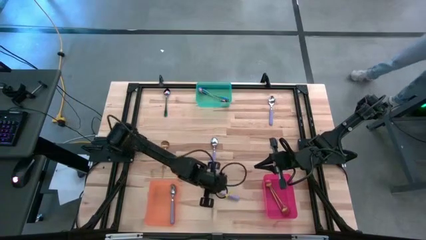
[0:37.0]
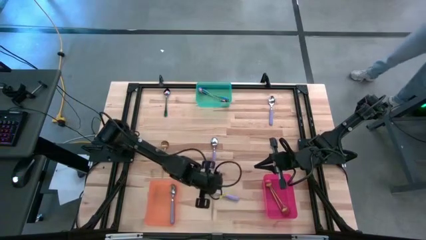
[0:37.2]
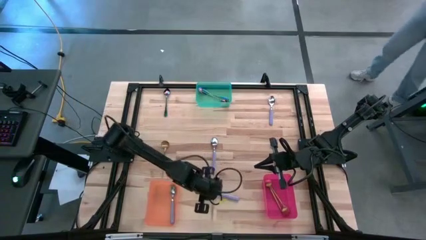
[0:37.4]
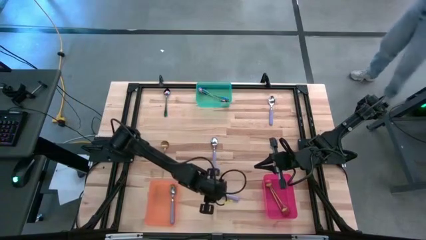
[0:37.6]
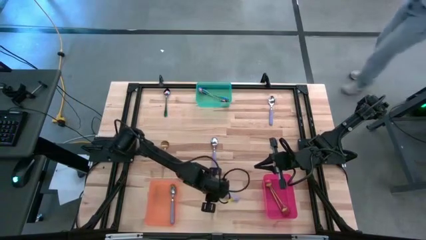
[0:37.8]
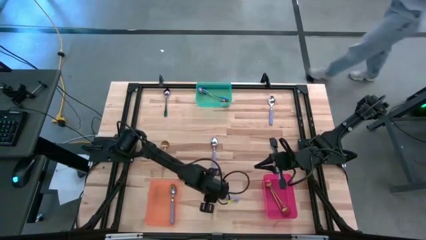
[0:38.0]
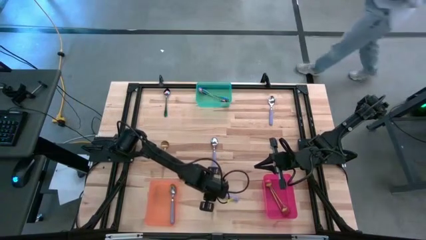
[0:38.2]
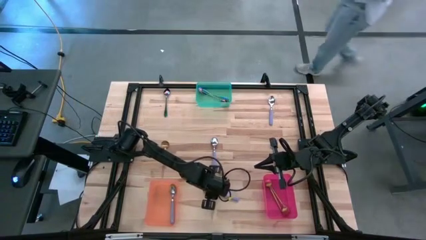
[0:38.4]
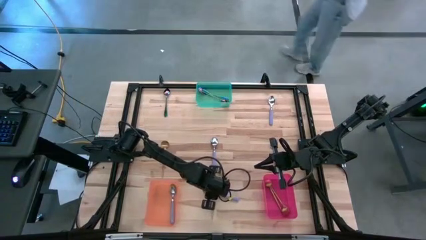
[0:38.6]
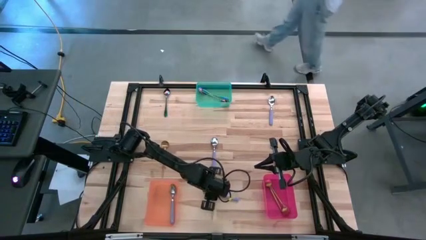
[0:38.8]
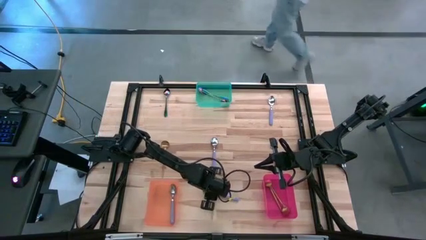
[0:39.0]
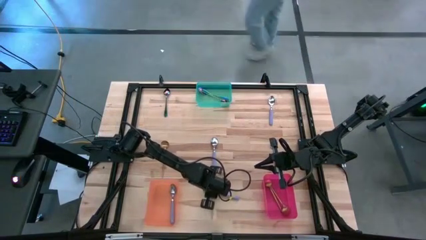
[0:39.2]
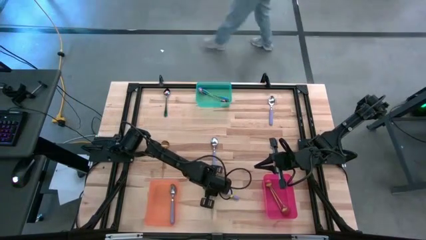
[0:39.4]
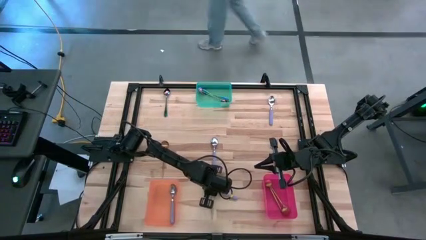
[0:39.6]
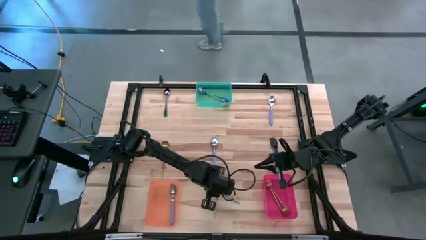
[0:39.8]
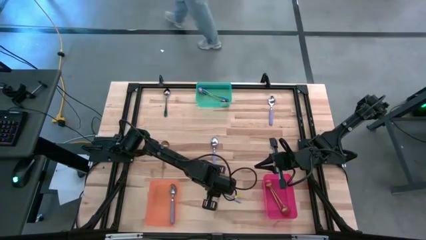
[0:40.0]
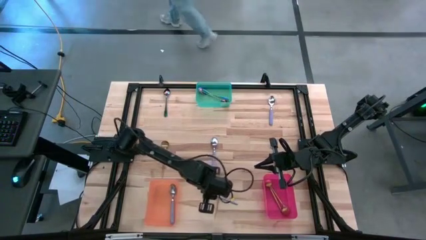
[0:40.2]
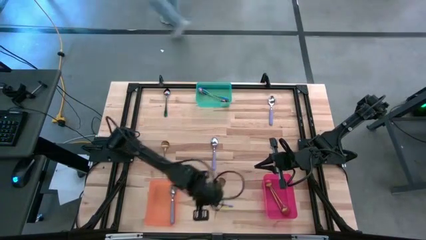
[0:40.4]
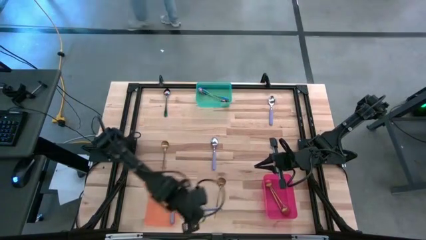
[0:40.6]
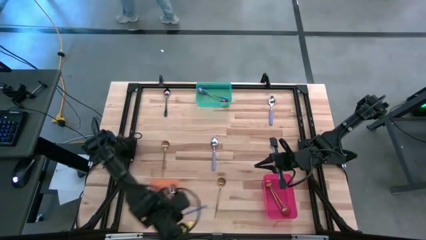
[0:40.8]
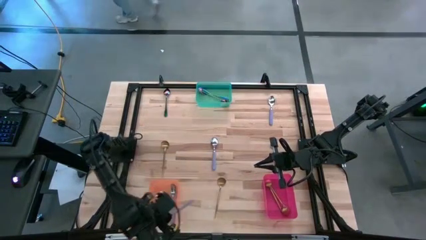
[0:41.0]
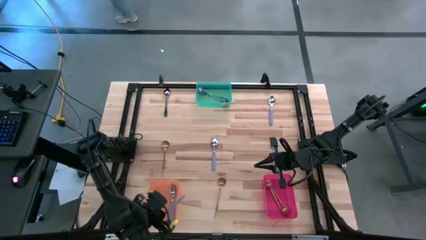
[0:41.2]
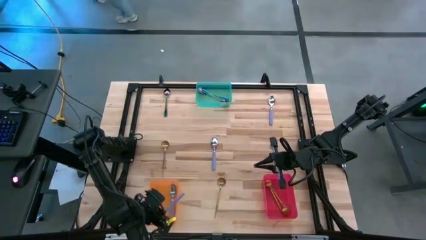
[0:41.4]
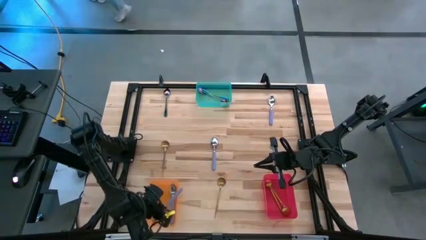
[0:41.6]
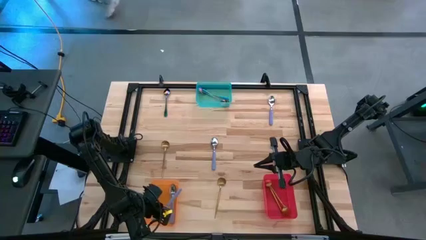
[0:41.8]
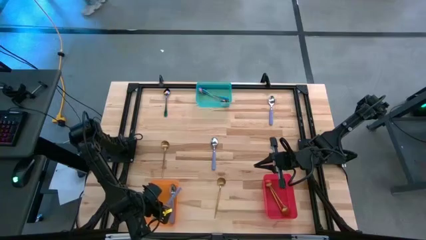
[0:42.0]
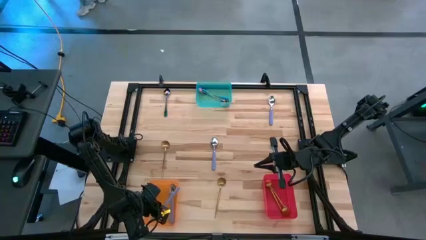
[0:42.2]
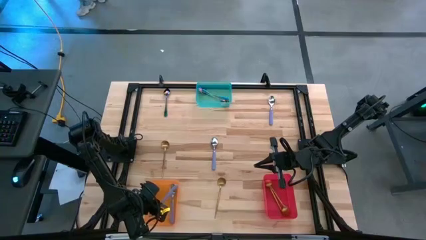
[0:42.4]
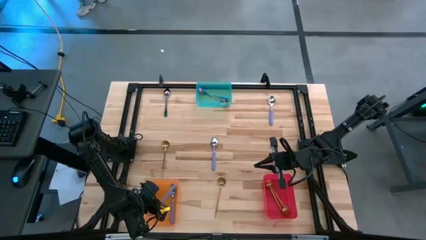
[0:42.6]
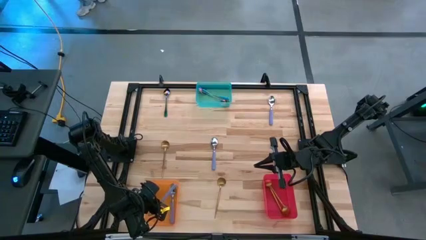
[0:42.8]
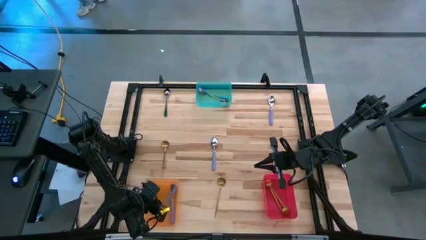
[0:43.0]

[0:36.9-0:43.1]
Task: Sort silverware by color (type)
Put the purple spoon into the orange bin

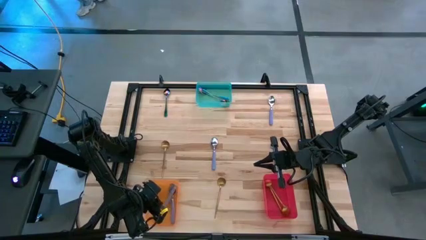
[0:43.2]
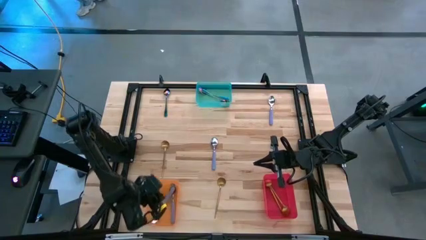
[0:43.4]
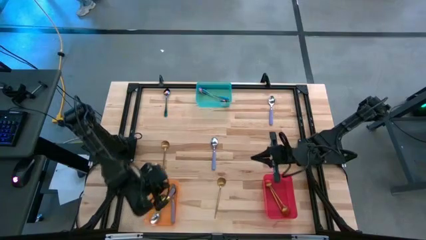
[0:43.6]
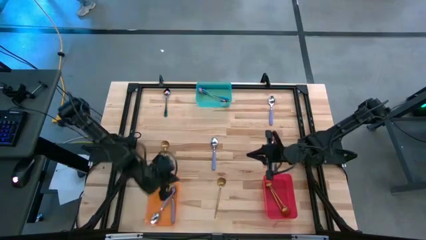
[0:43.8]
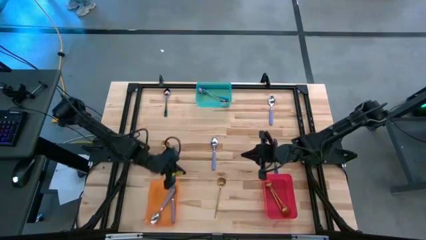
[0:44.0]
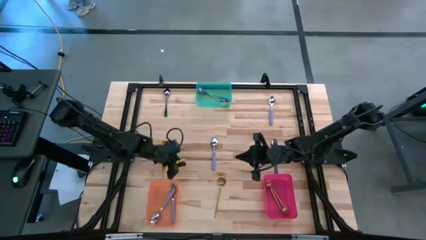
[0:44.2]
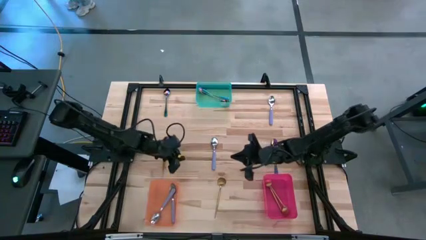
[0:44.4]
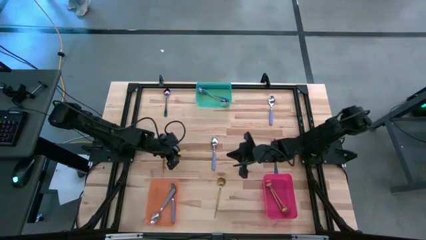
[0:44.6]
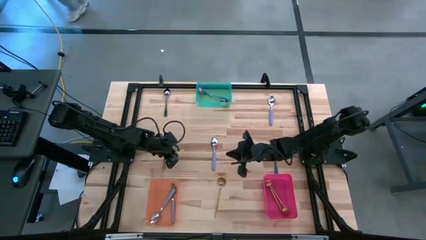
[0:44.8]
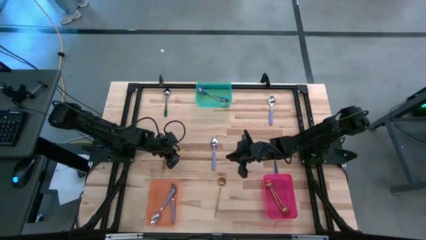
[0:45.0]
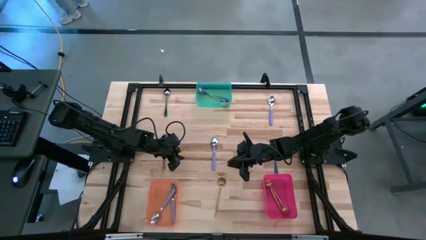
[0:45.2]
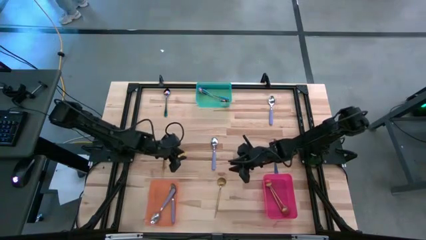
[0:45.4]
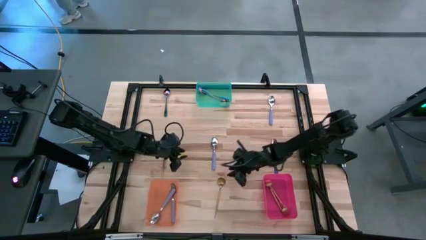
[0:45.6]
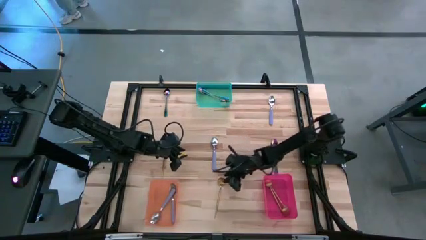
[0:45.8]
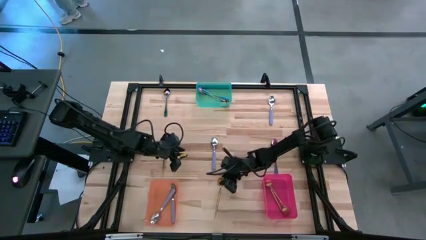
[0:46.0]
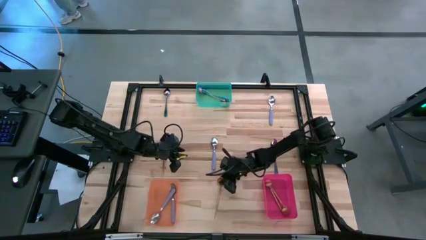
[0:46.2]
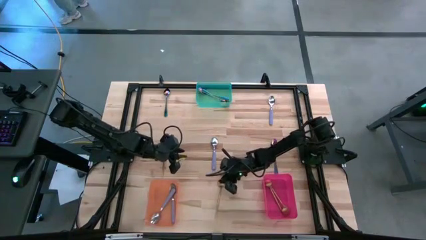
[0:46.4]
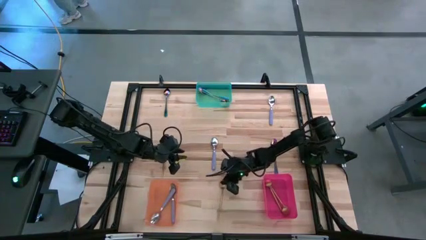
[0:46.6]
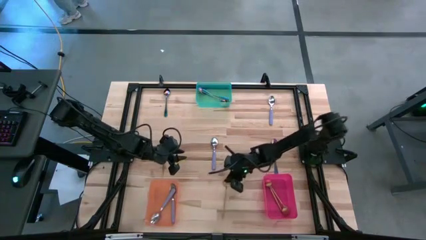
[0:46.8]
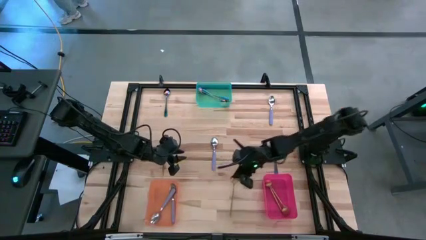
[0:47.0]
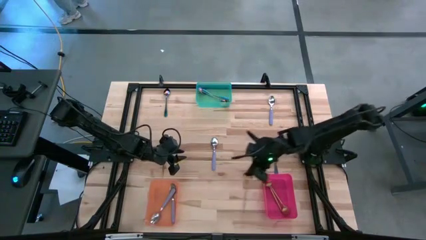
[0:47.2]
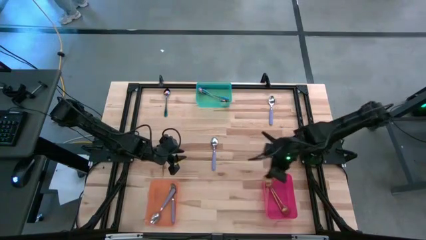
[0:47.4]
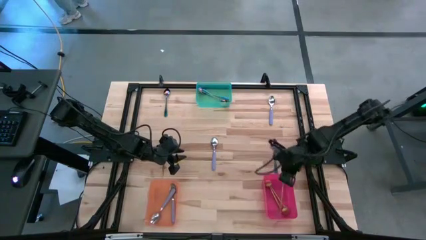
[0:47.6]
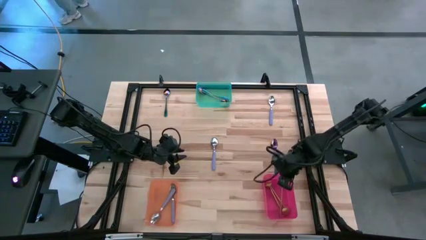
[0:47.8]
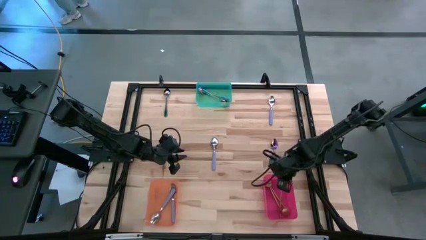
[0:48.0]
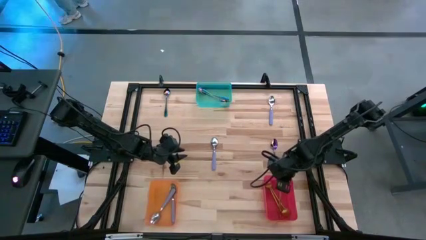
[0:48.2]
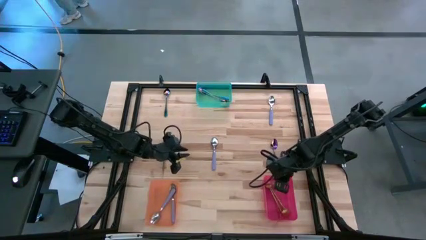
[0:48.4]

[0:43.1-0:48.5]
Put the yellow spoon into the red bin

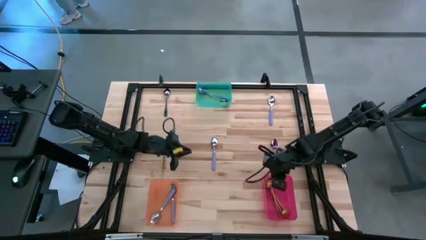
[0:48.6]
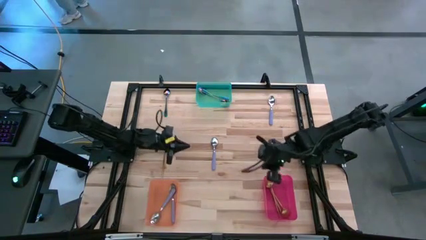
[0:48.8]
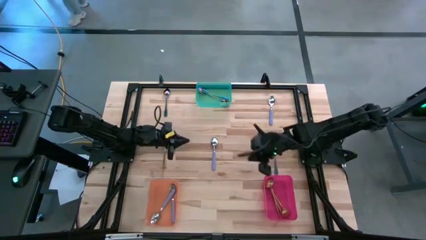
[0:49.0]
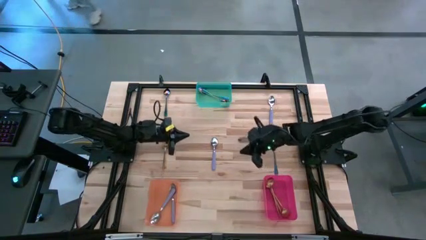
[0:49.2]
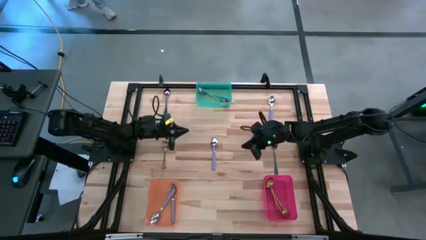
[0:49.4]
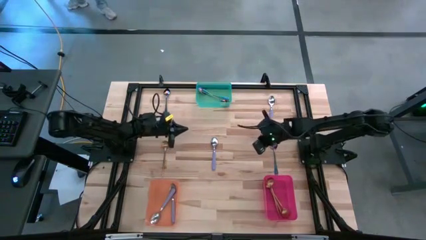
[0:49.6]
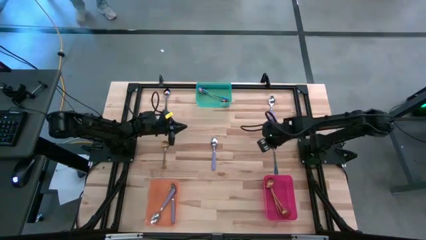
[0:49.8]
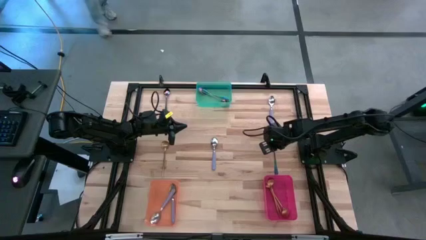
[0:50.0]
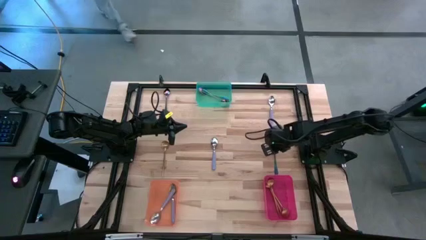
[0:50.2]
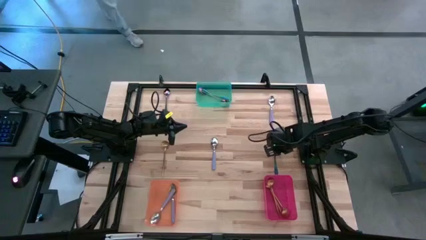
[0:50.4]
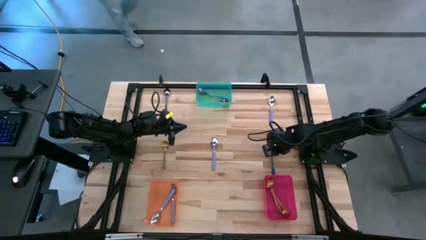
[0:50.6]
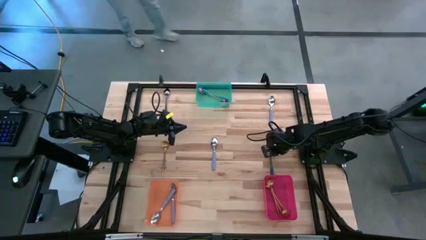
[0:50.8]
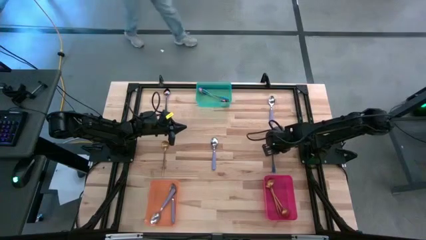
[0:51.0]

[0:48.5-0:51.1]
Put the blue spoon into the green bin

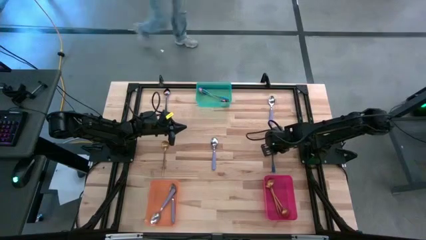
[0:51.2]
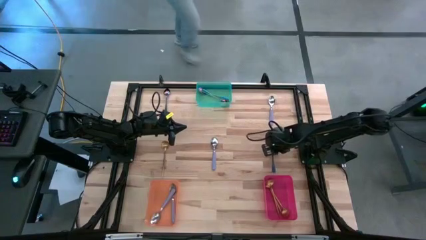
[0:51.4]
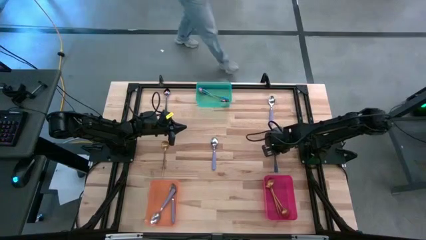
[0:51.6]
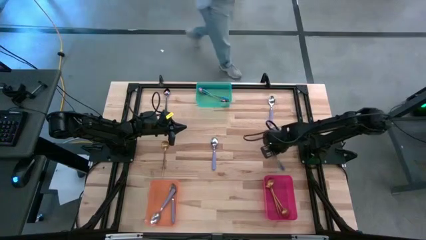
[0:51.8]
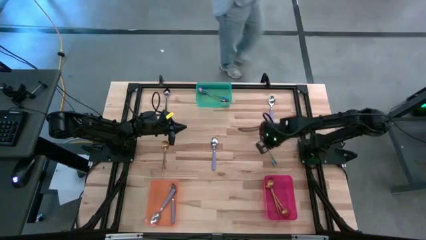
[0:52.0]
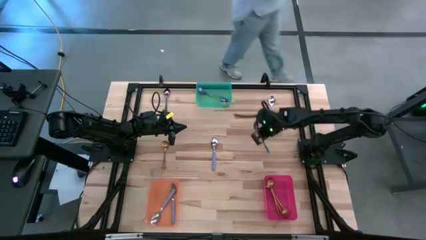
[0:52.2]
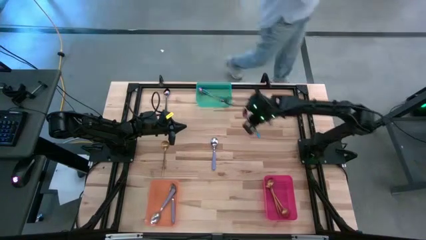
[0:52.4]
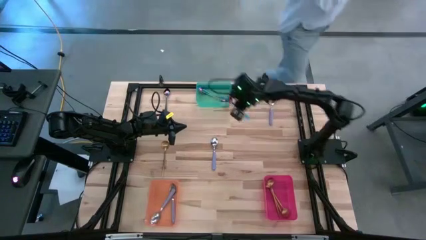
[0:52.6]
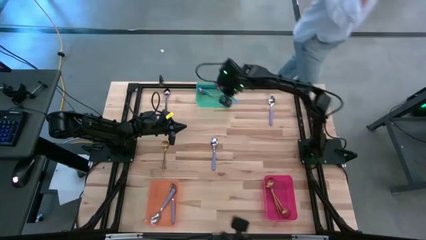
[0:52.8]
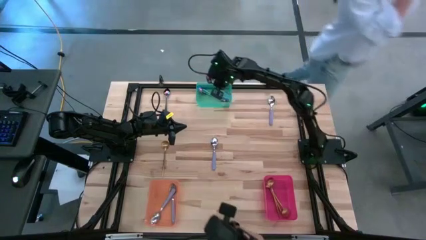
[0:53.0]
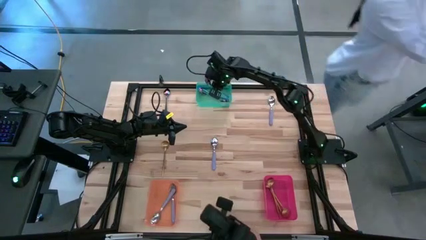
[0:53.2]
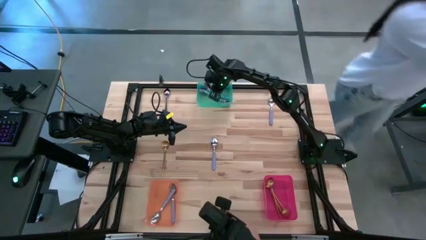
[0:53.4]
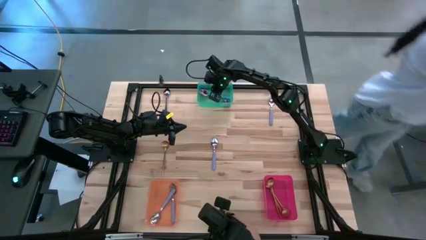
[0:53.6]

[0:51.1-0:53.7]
Put the blue spoon into the green bin
